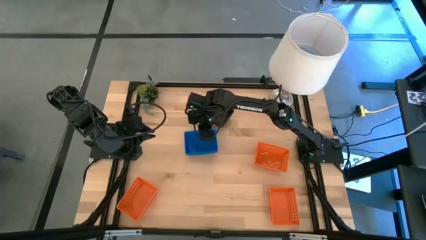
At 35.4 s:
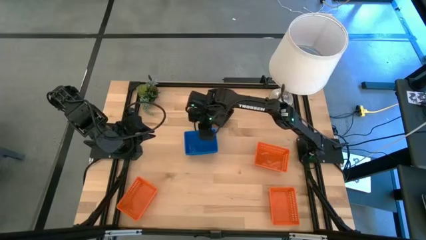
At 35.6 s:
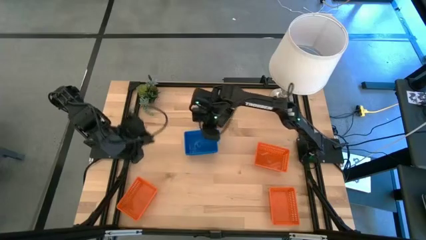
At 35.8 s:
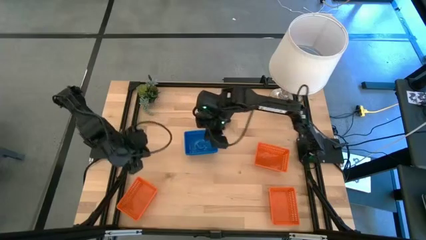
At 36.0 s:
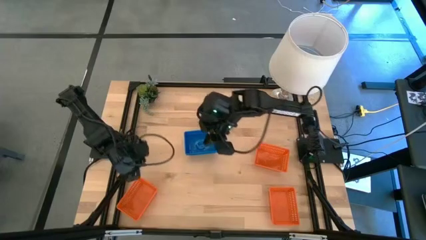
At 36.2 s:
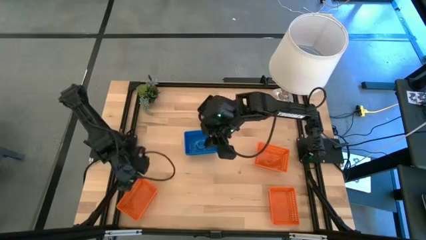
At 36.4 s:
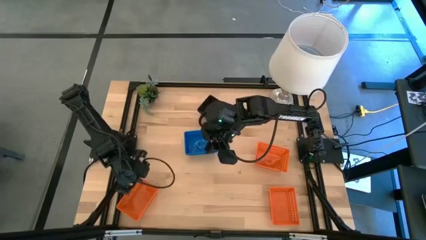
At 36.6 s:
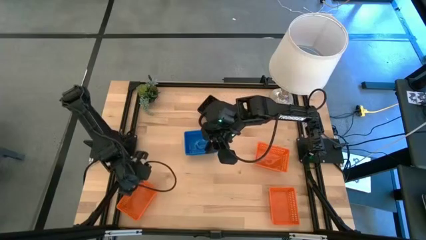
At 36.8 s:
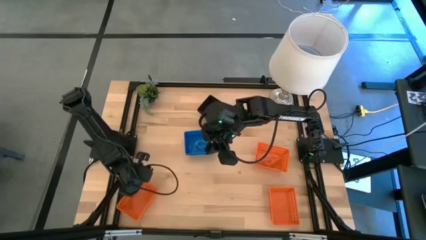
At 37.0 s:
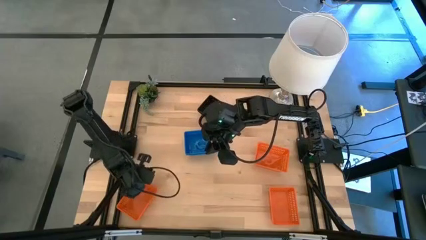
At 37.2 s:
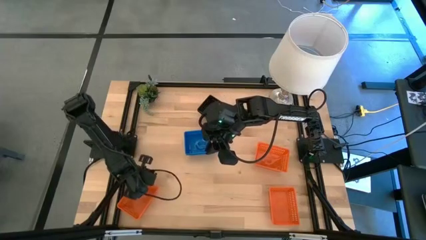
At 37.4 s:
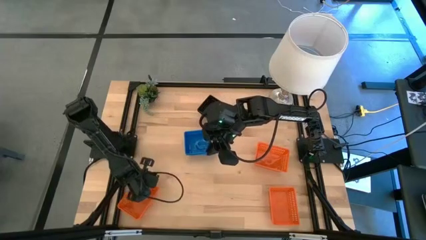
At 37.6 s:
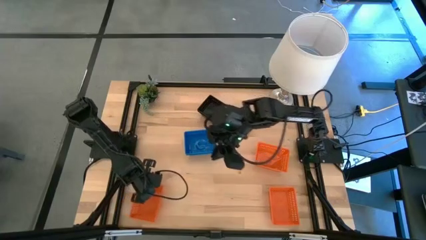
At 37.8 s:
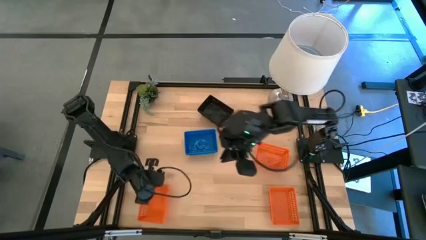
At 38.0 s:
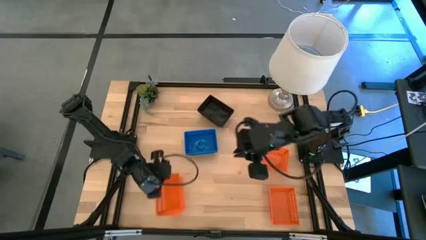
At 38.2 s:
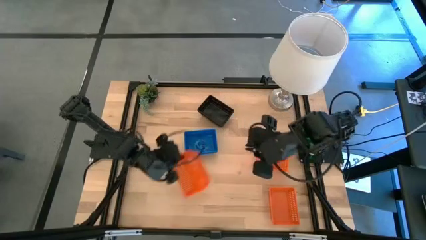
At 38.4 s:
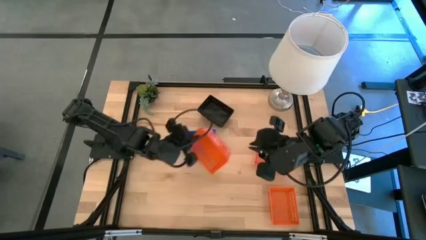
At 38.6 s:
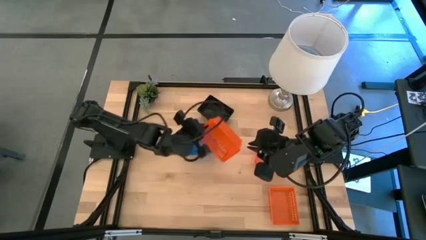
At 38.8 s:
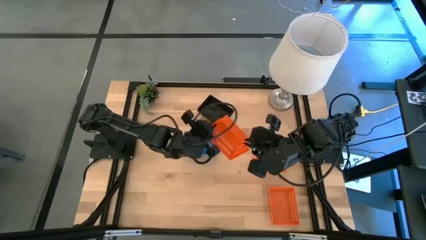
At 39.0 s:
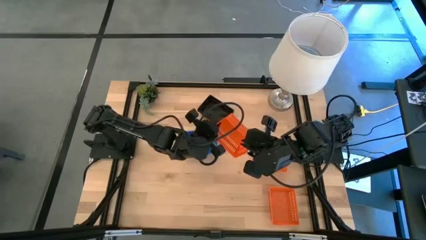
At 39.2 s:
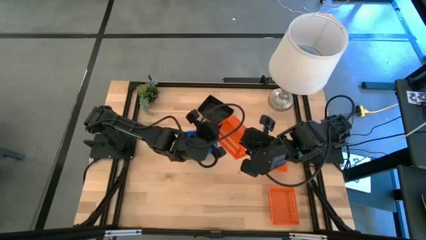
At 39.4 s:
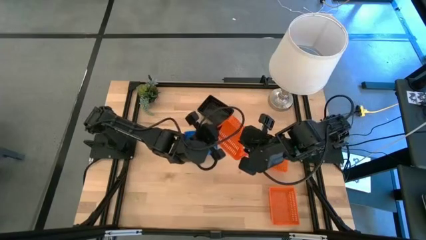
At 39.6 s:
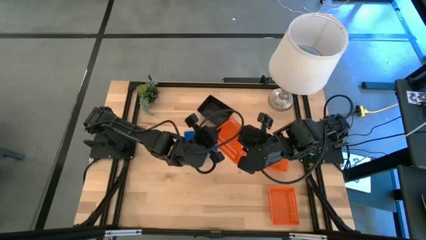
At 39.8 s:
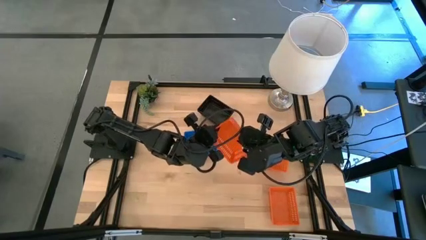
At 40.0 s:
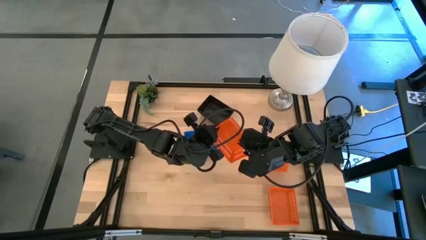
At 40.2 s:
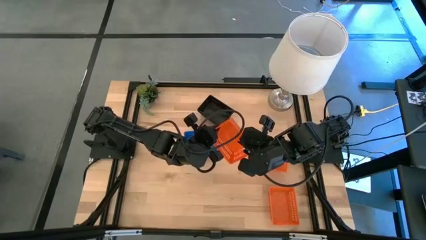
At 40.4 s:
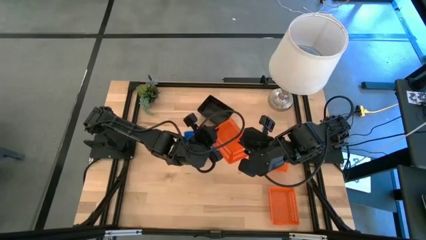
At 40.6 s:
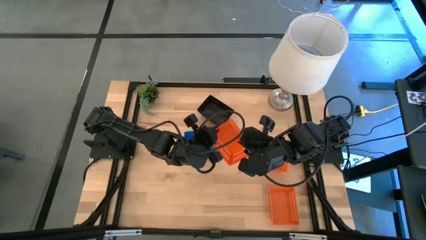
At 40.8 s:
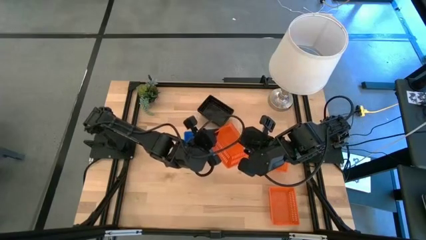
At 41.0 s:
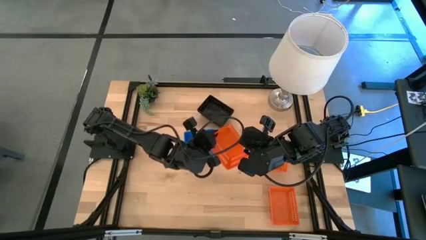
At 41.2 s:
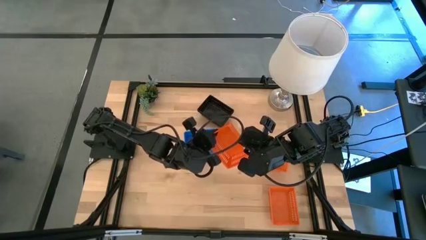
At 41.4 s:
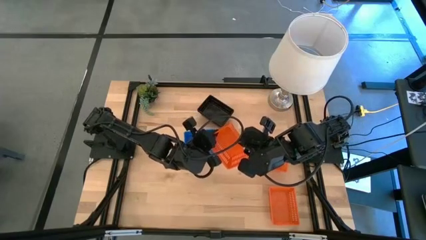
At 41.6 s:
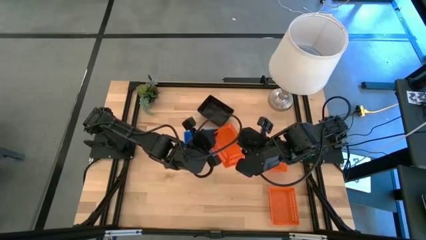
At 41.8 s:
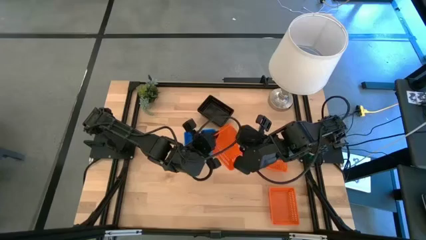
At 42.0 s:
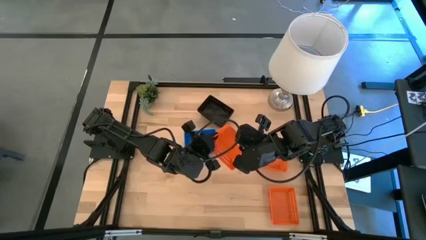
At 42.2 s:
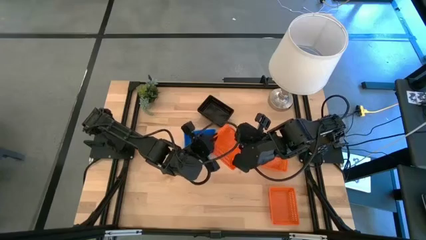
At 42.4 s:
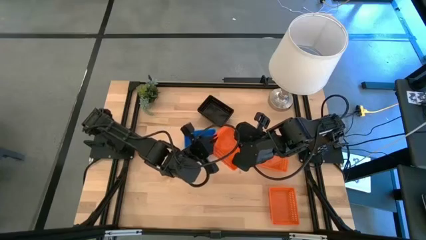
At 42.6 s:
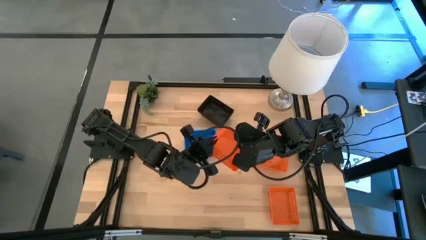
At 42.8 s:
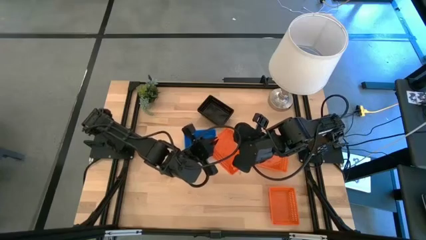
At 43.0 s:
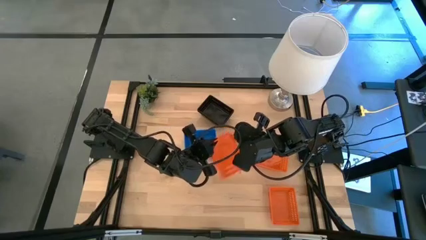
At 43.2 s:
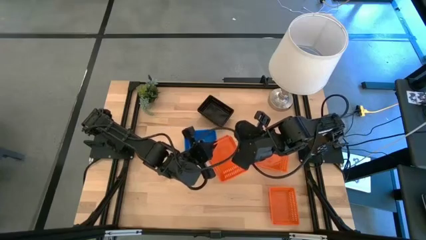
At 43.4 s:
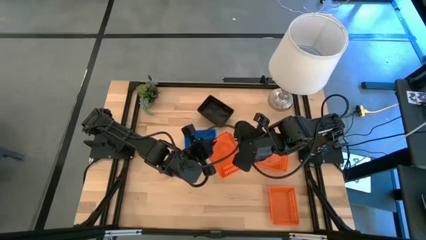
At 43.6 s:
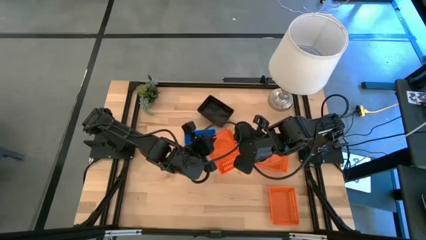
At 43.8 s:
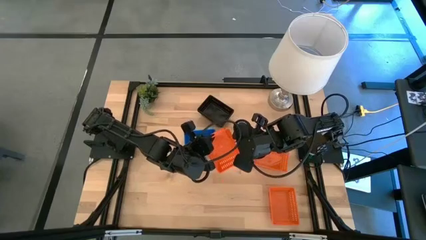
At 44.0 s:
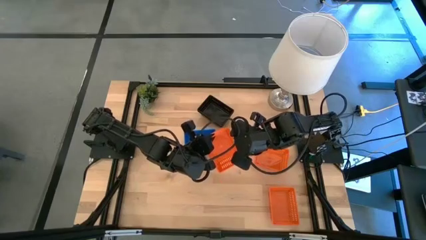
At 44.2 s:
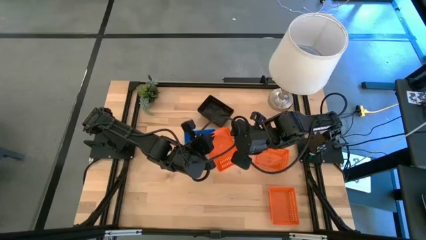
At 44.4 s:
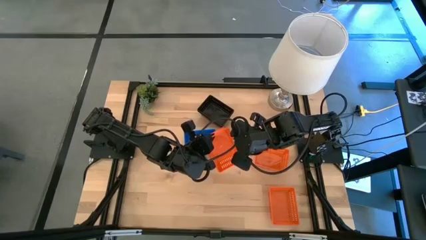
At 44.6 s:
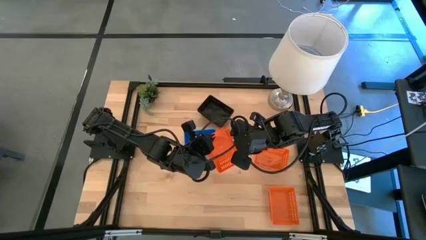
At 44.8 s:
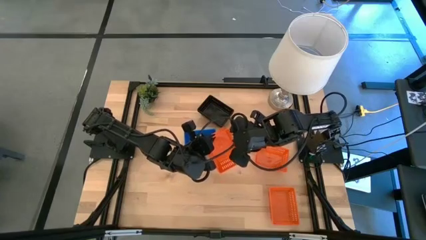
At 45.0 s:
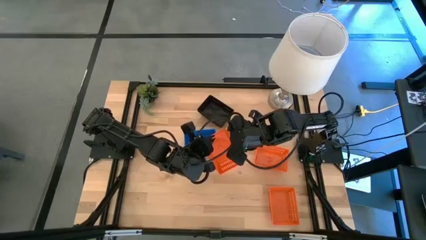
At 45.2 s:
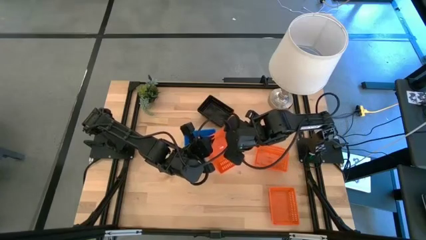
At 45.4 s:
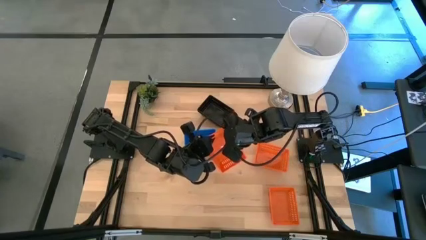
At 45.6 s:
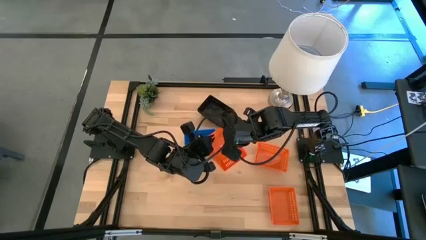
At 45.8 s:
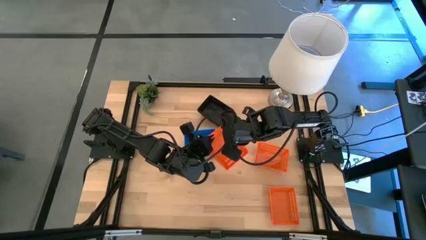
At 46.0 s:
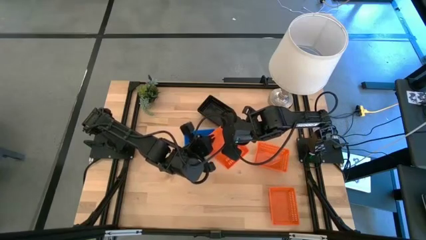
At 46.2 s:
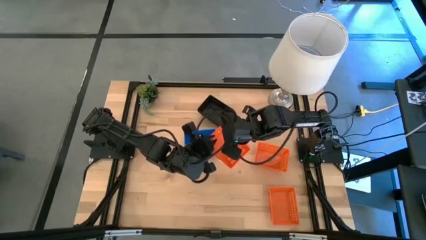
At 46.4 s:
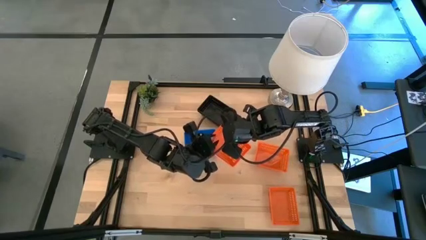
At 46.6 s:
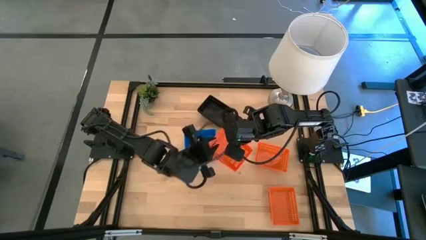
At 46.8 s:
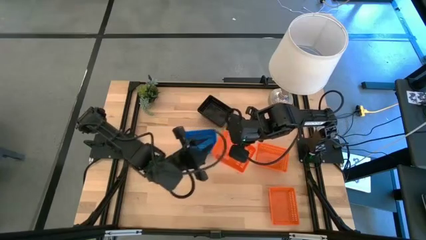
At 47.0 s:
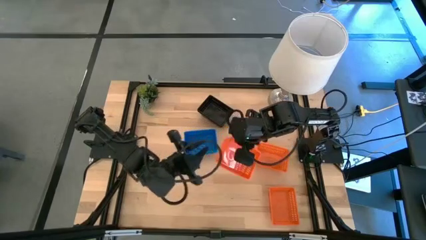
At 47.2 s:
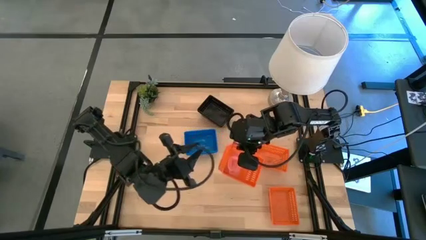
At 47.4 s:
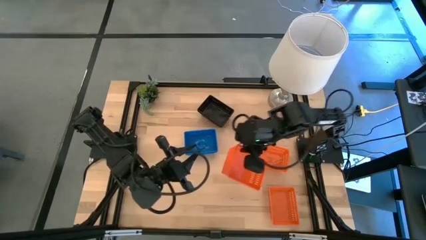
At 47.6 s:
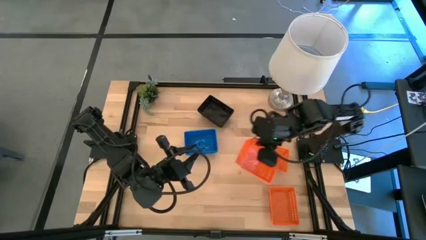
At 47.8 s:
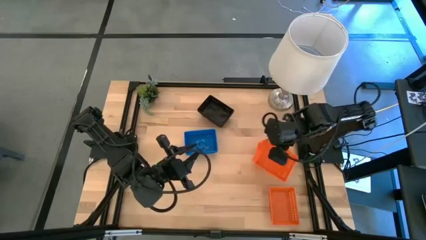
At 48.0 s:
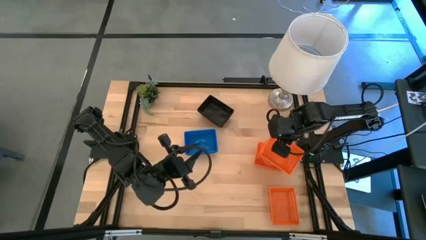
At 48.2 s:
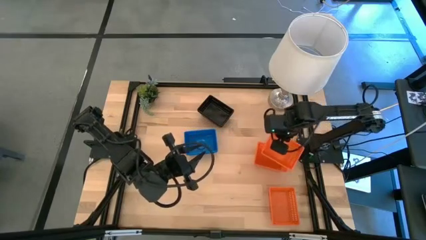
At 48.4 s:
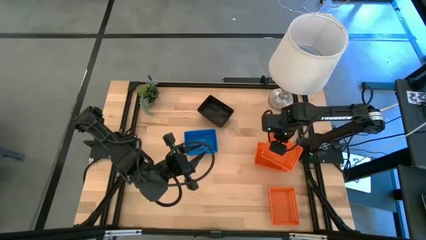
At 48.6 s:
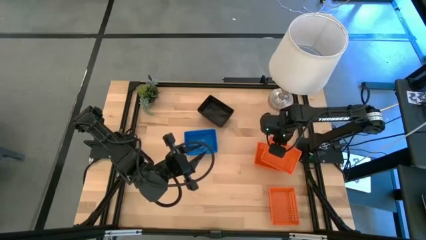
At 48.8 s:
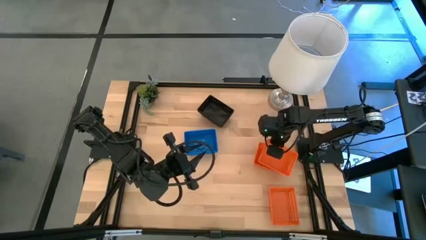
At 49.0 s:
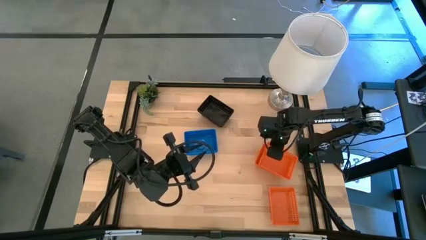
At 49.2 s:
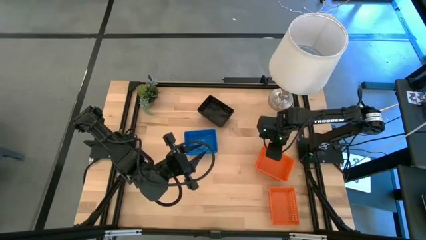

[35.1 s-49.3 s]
Stack the bottom left orange bin on the top orange bin
